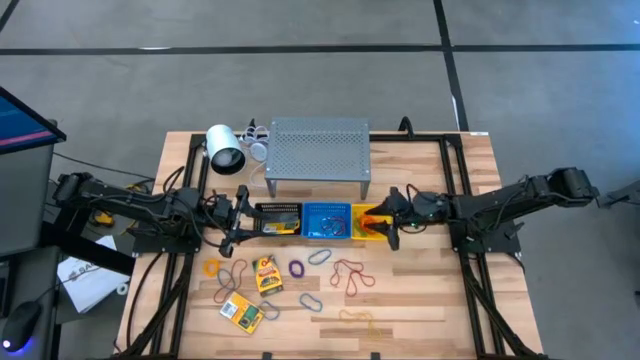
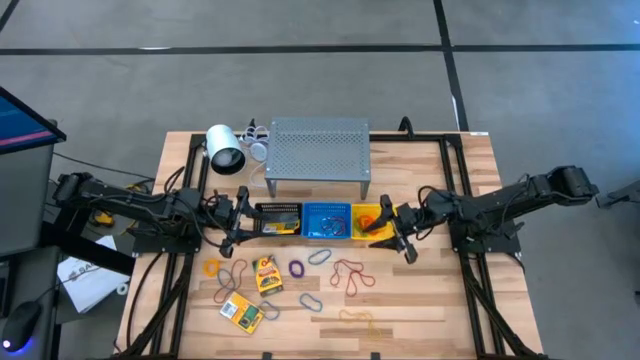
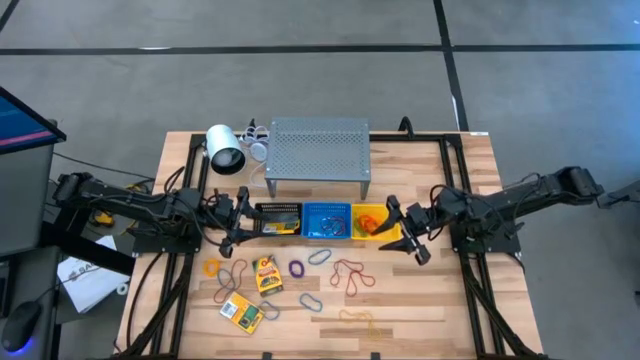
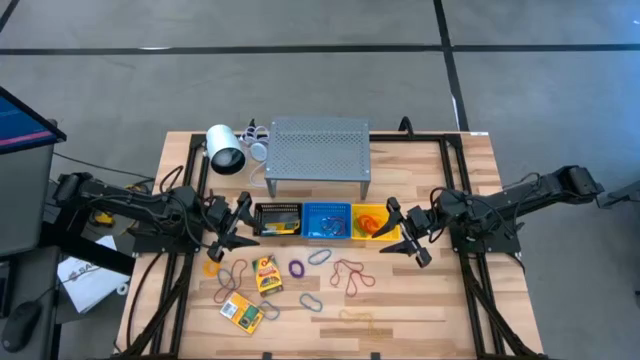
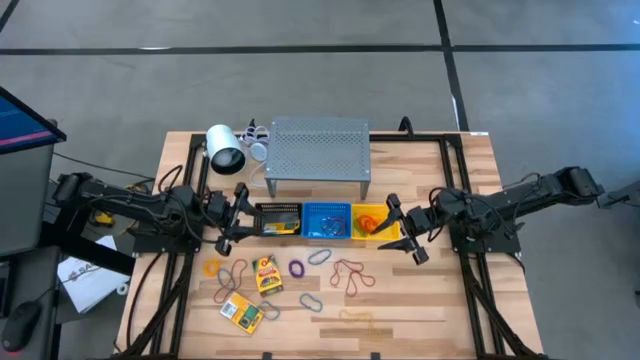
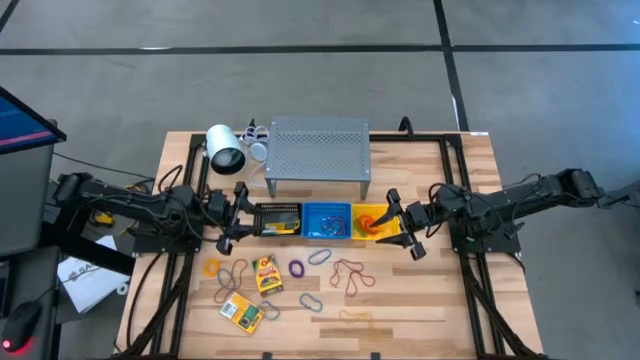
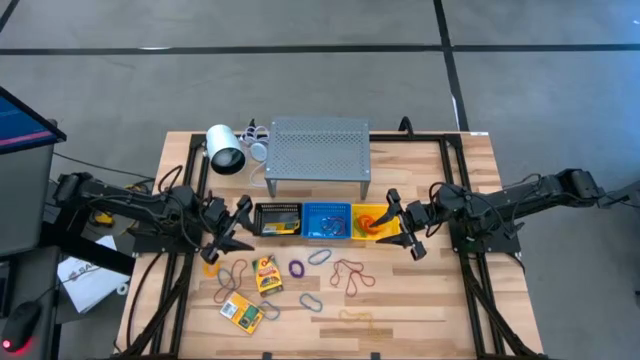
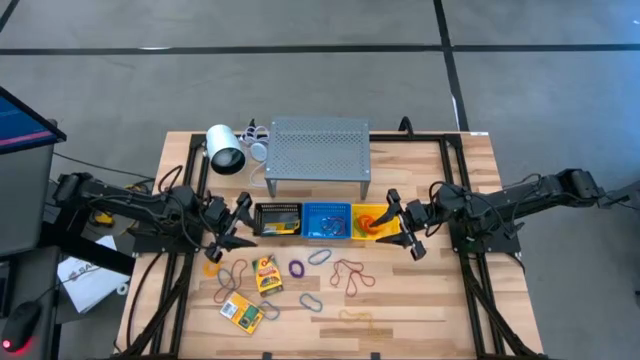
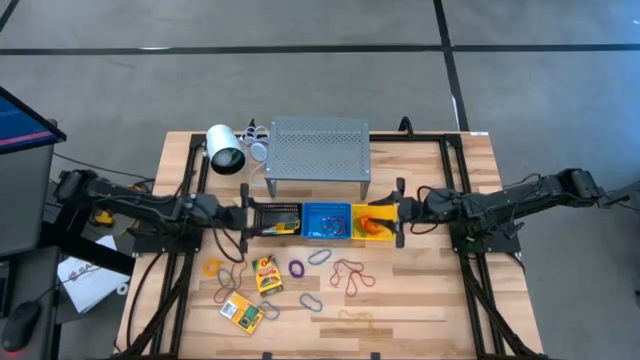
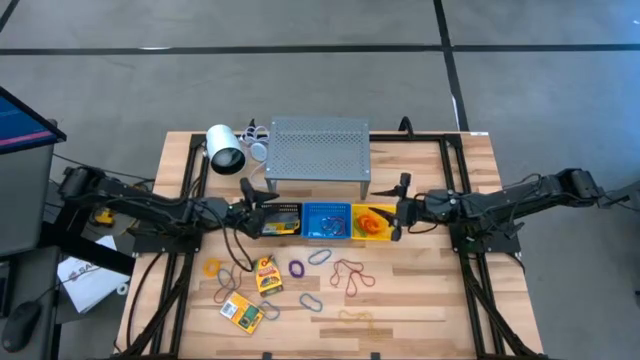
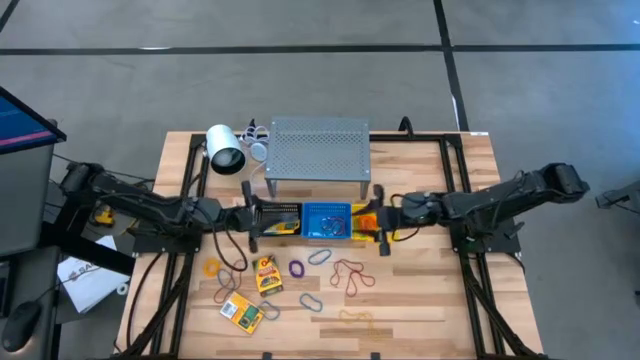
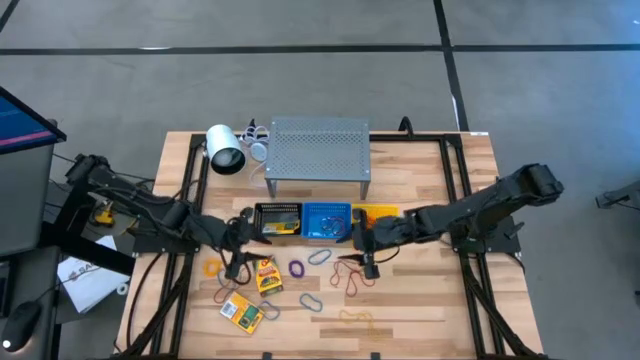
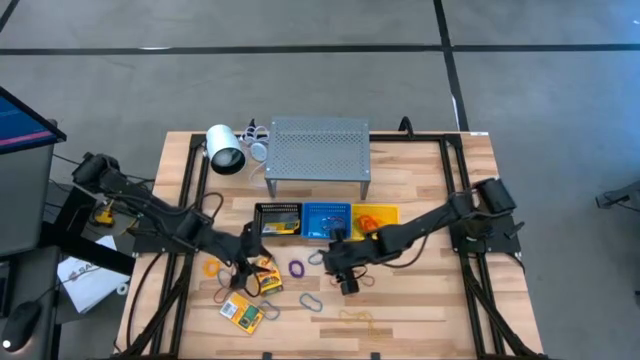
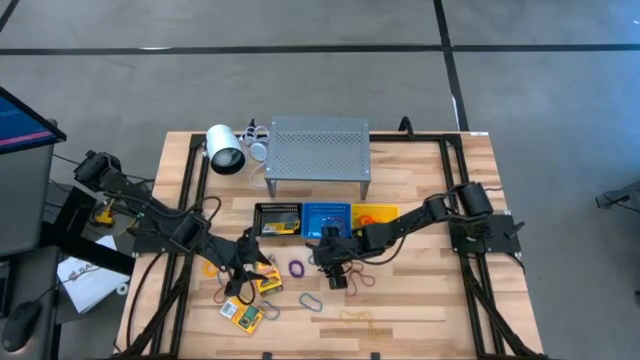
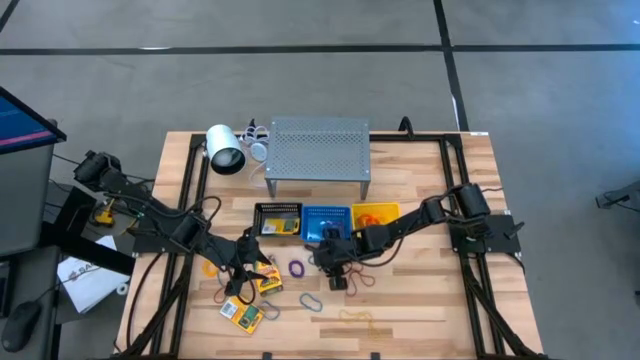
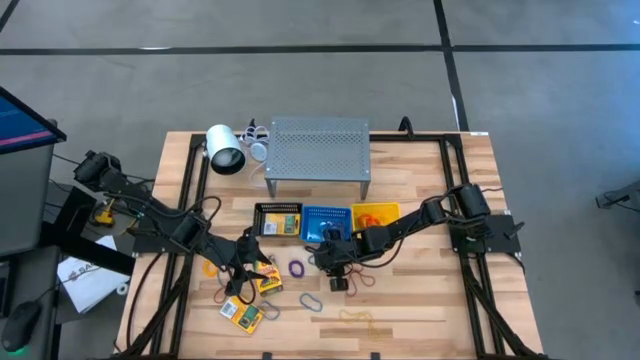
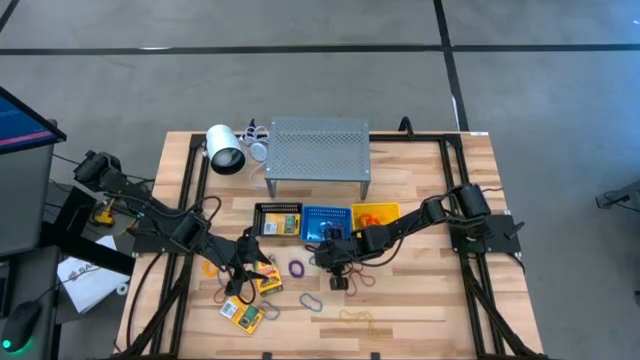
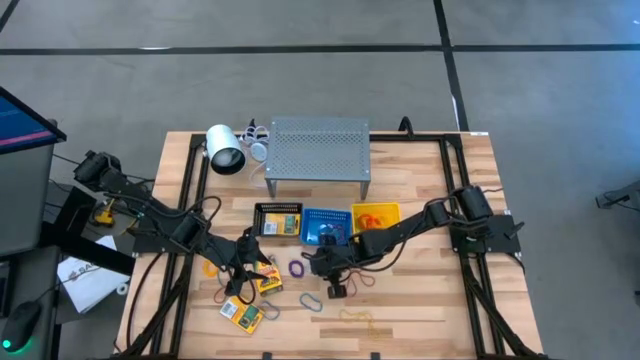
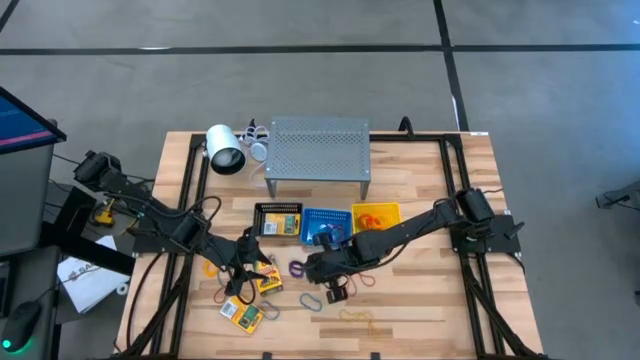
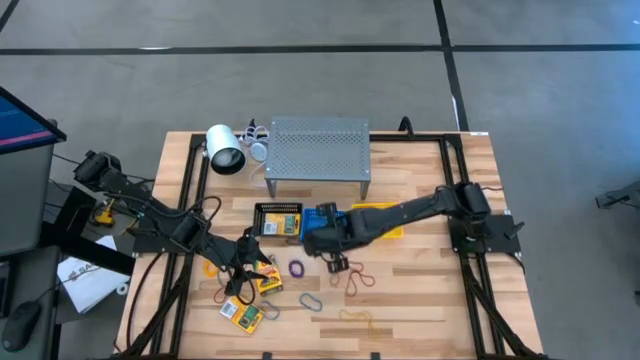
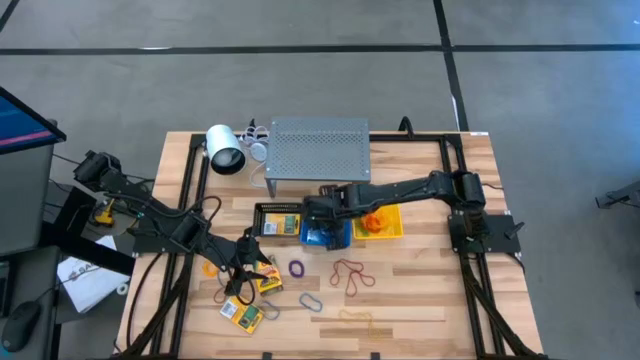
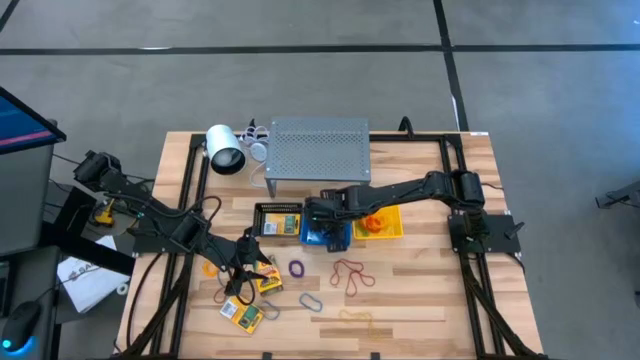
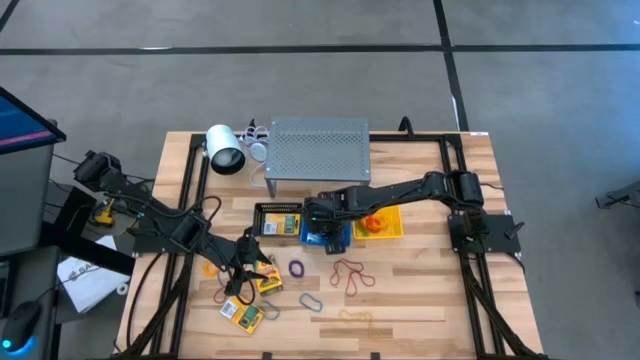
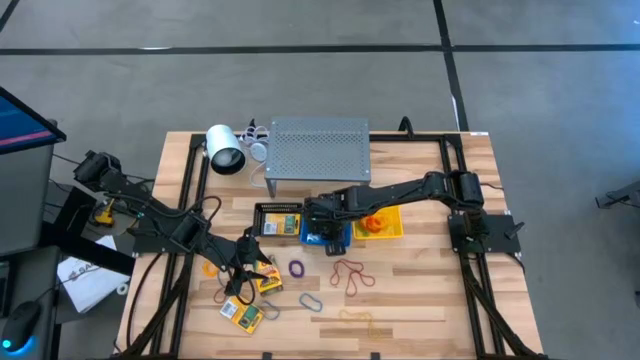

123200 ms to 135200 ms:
Task: Pick & Place Office Desk Supplies
Put the blue rubber band into the blue bin

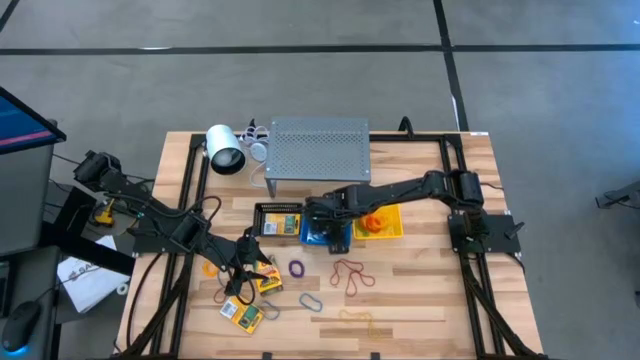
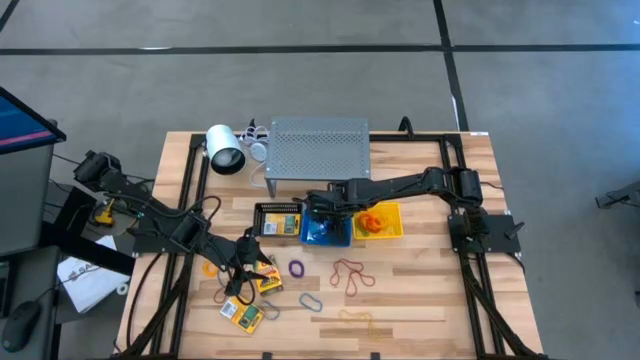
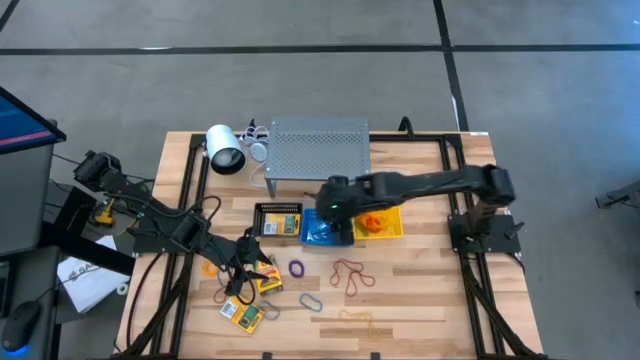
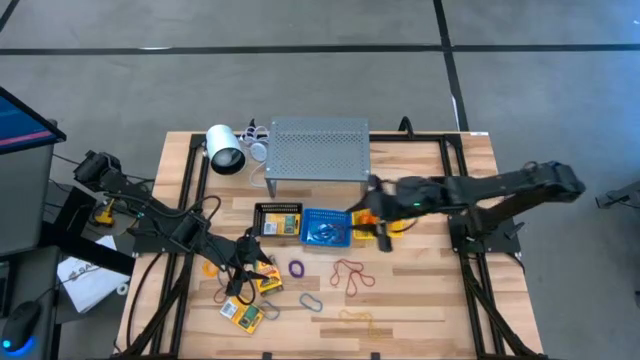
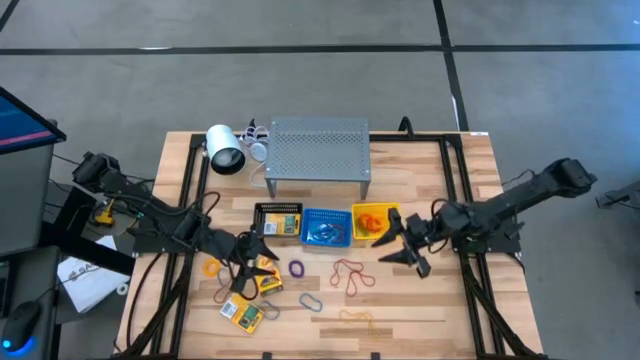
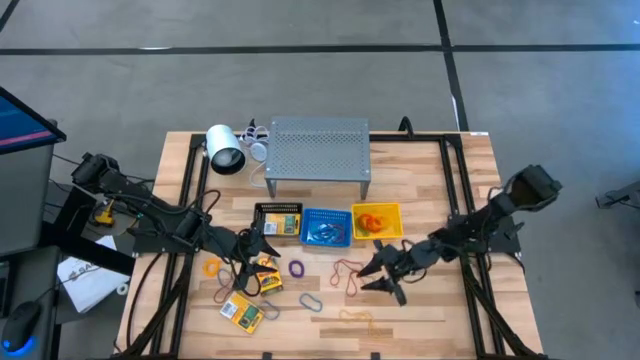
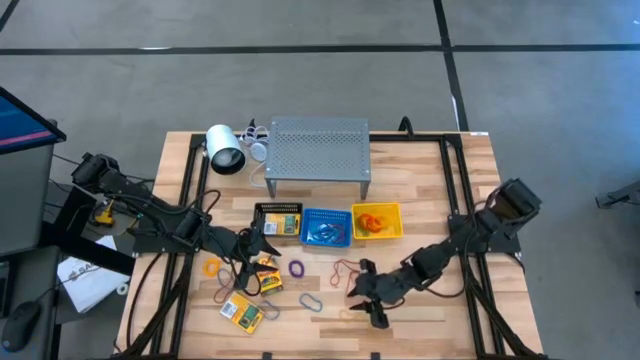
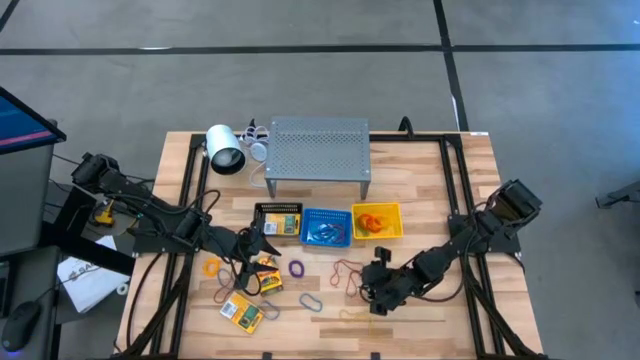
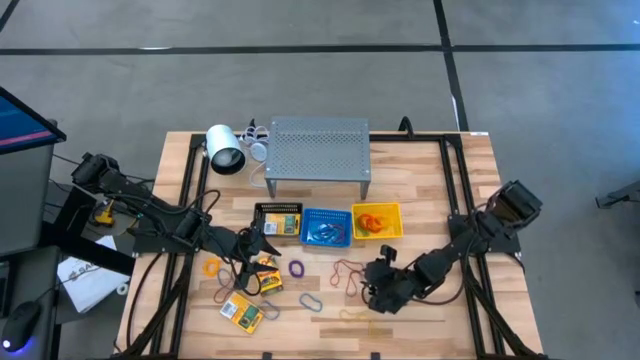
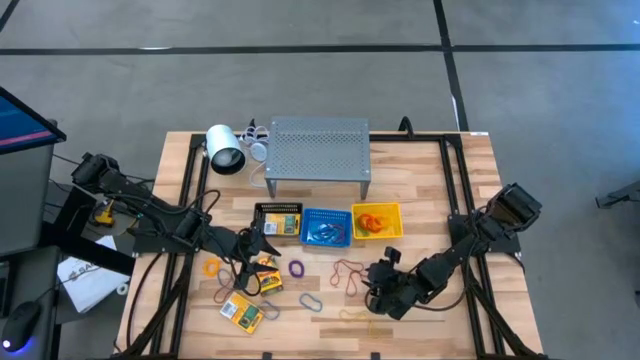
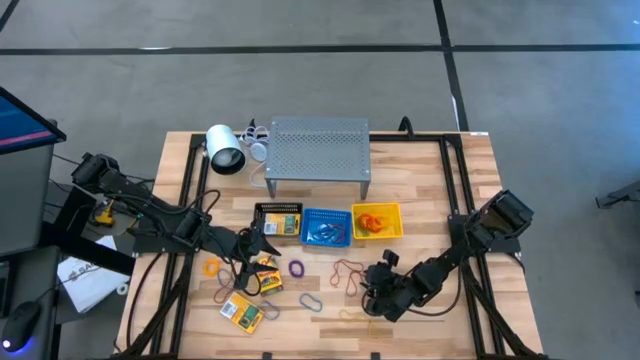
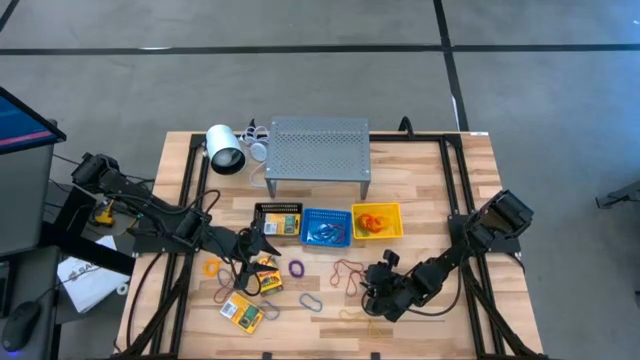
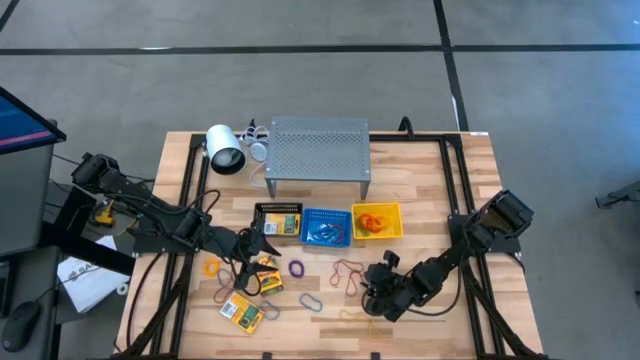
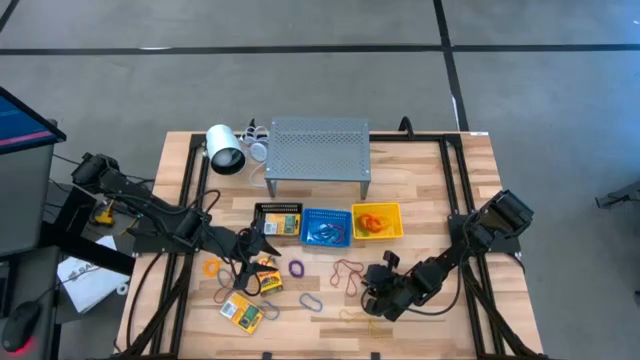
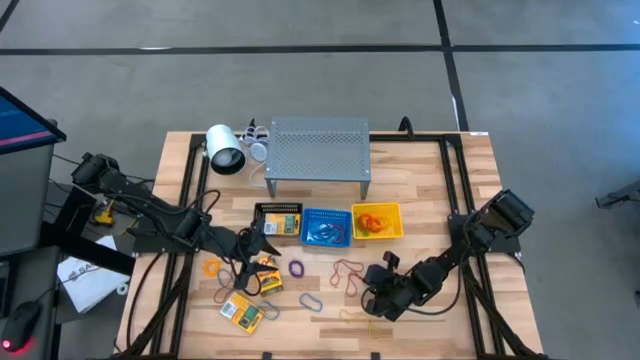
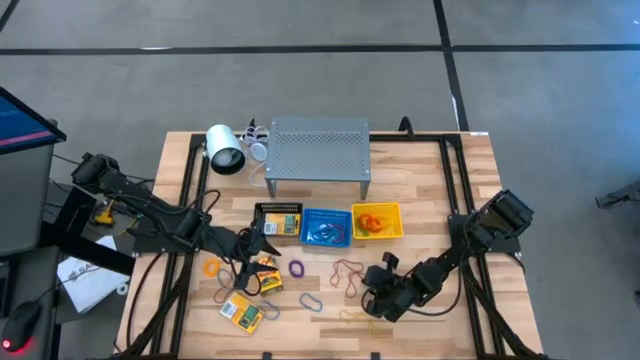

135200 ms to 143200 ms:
Put the red rubber band into the blue bin

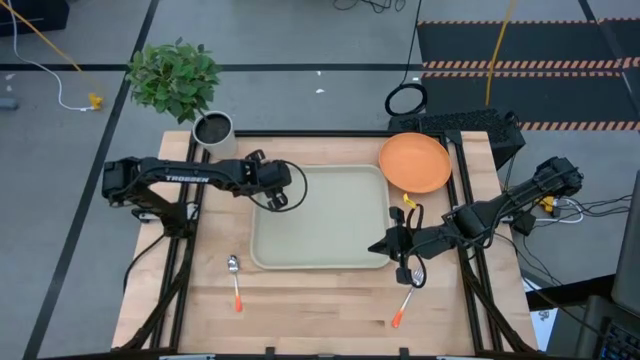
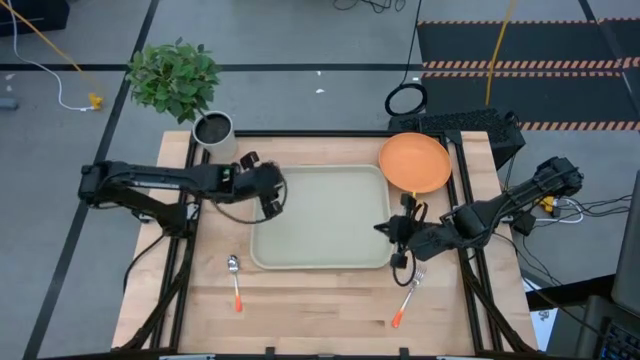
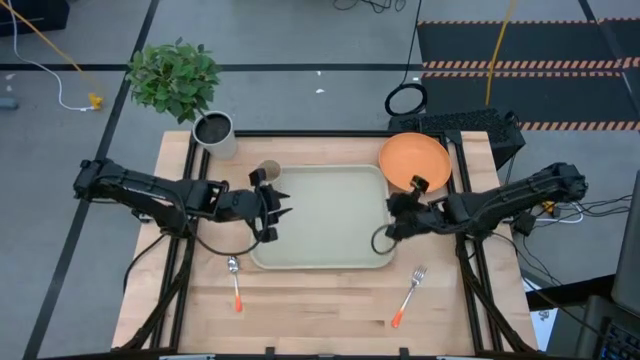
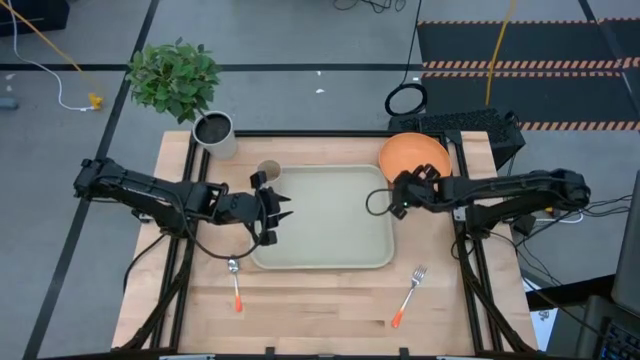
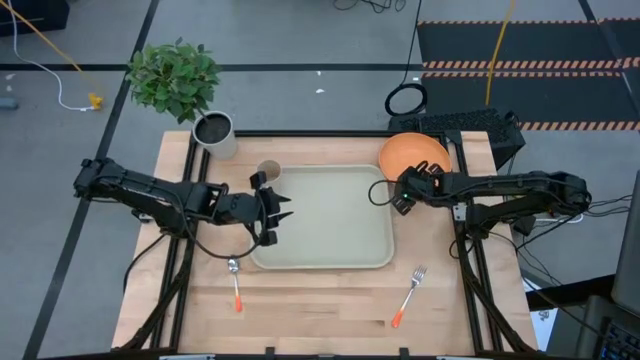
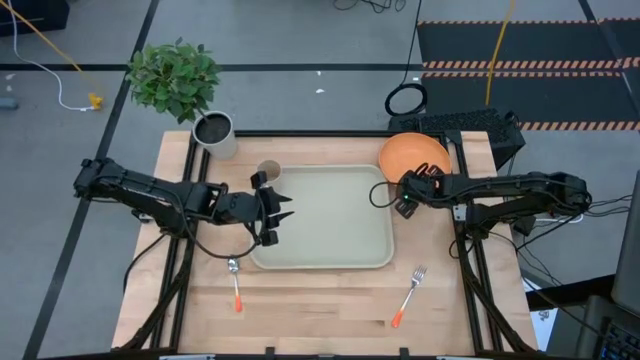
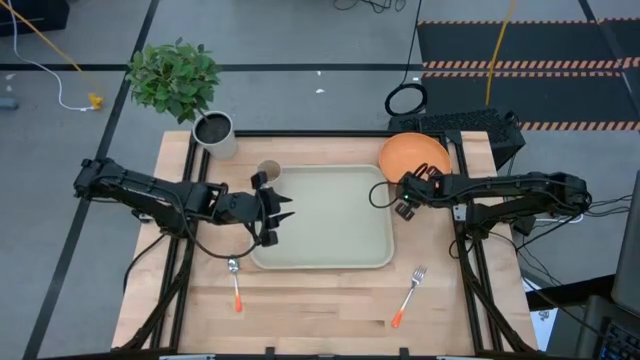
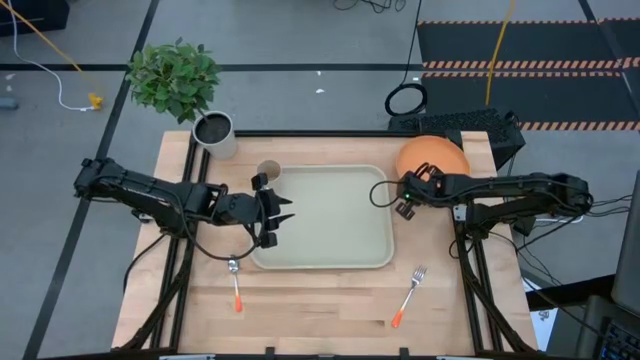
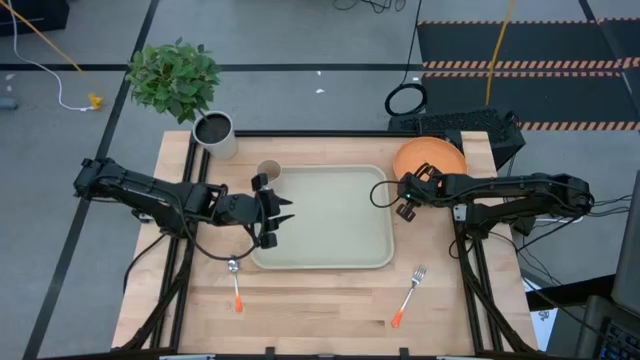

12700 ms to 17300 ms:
Task: Pick and place plate/cup/fork/spoon on tray
Put the orange plate on the white serving tray
